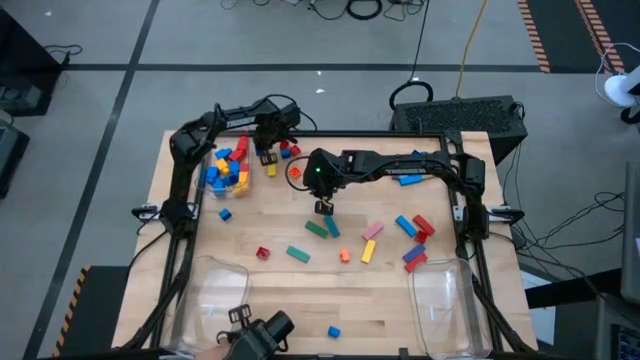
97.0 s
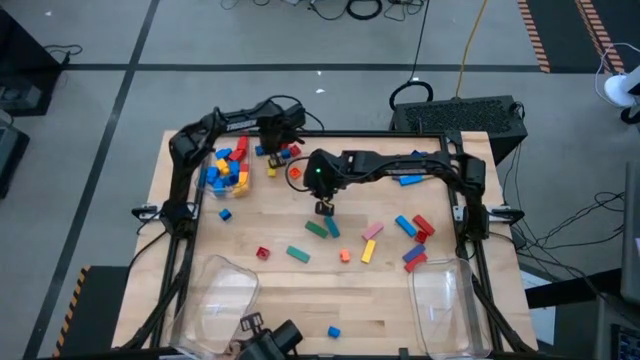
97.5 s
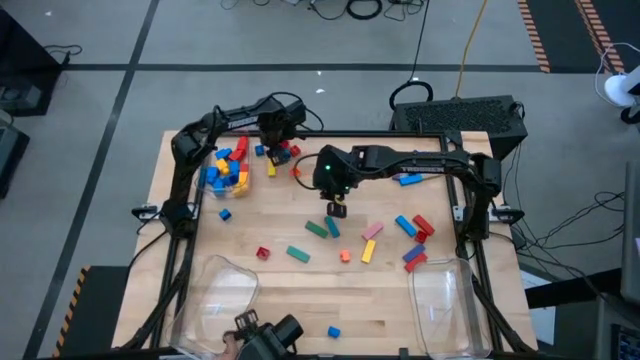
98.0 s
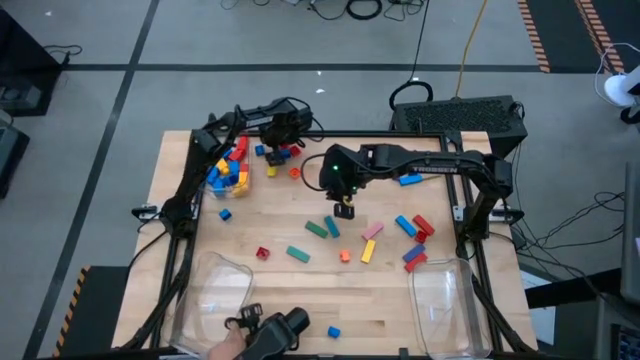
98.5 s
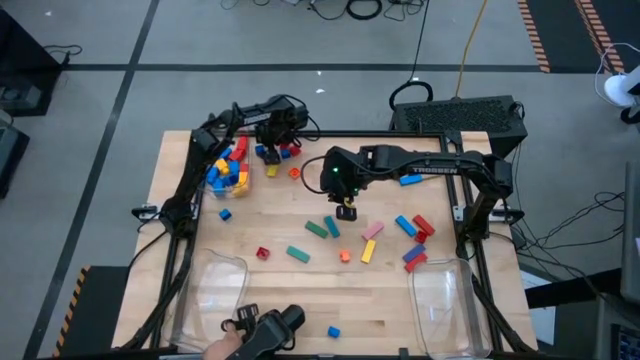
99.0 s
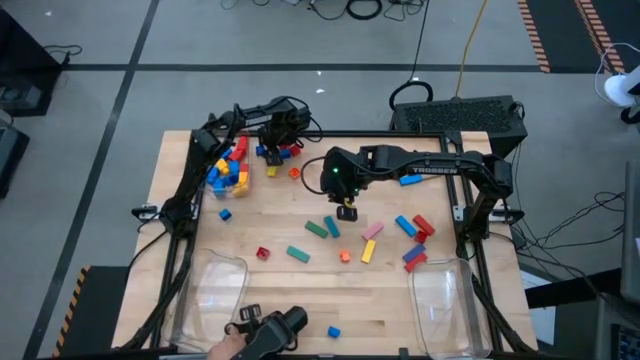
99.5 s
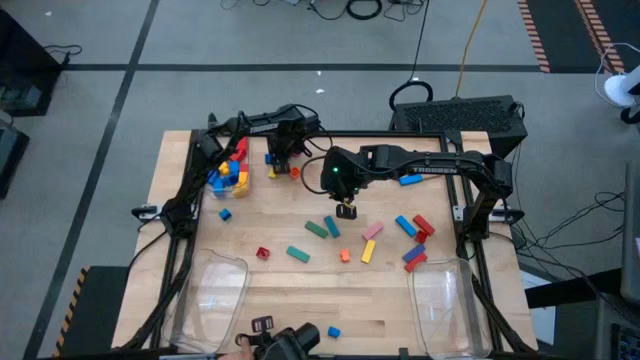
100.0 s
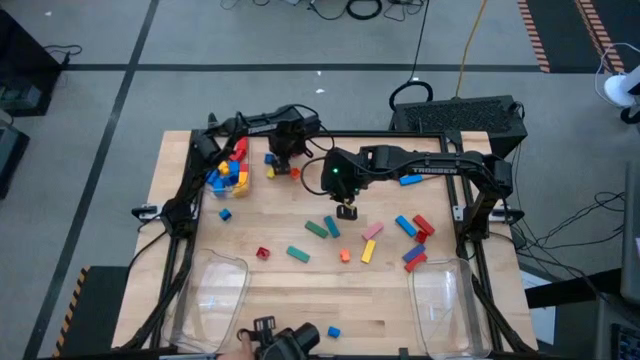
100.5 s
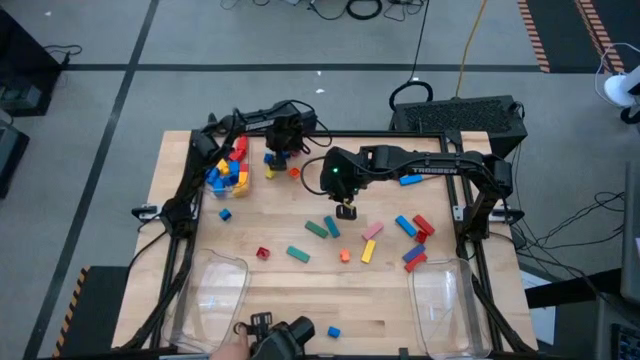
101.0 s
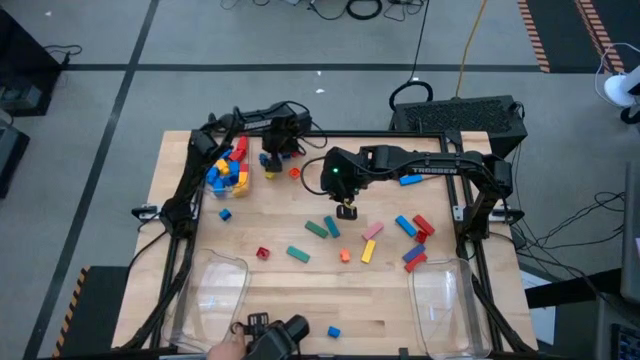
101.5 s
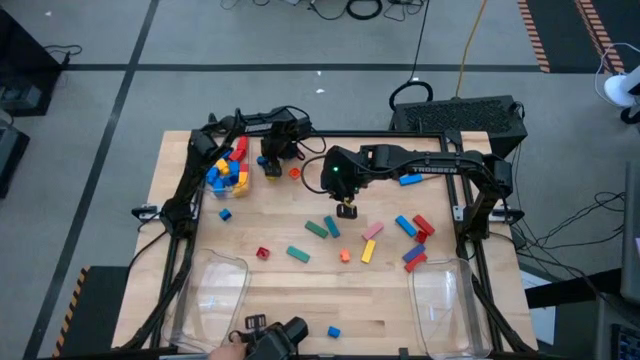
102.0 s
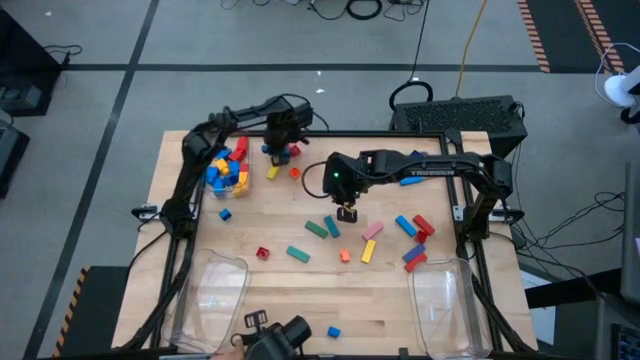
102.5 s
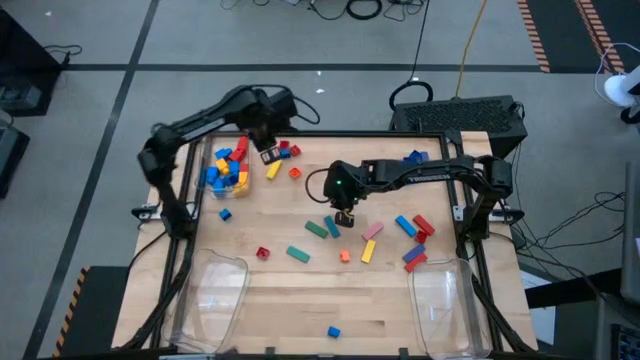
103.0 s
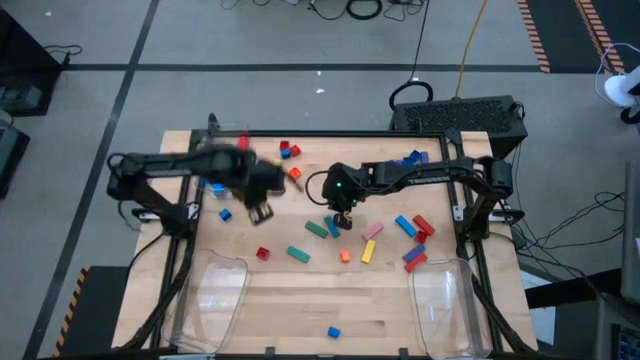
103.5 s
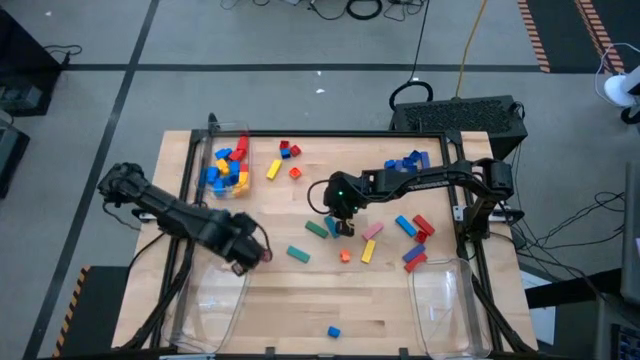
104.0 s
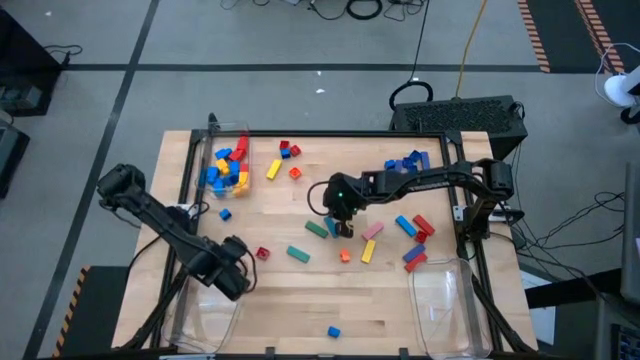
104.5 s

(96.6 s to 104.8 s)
Task: Sort blocks by size
Put the blue four stud game piece into the bottom left transparent bin

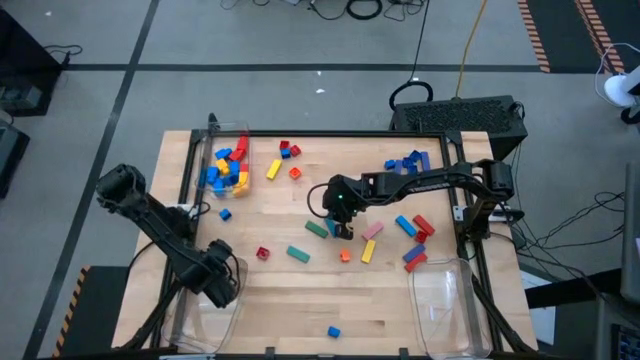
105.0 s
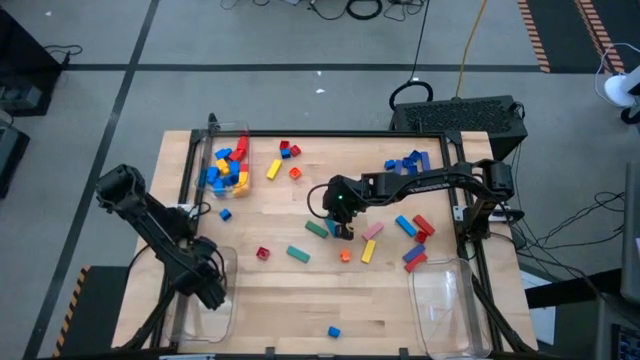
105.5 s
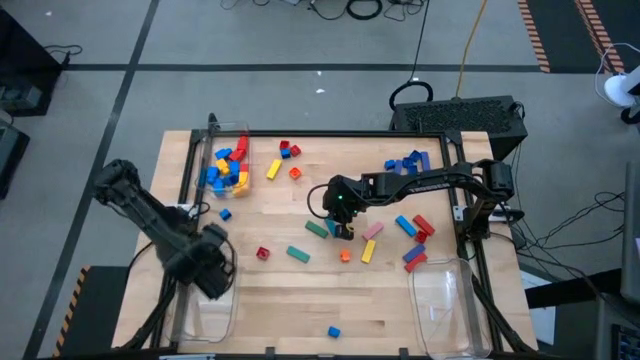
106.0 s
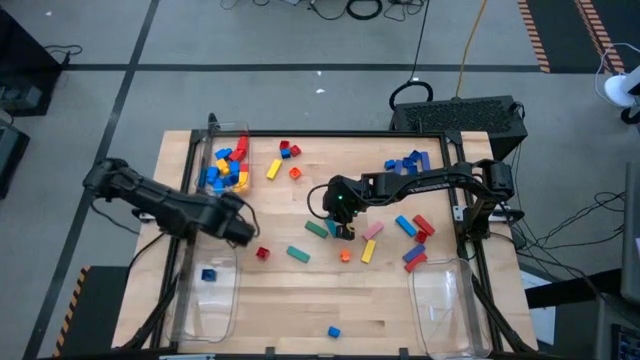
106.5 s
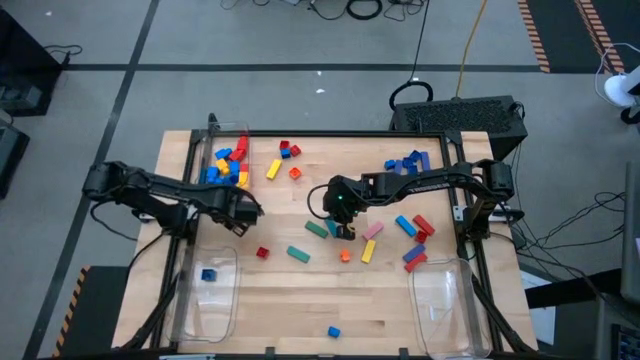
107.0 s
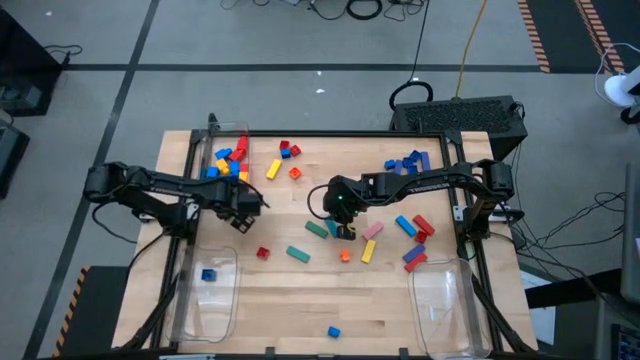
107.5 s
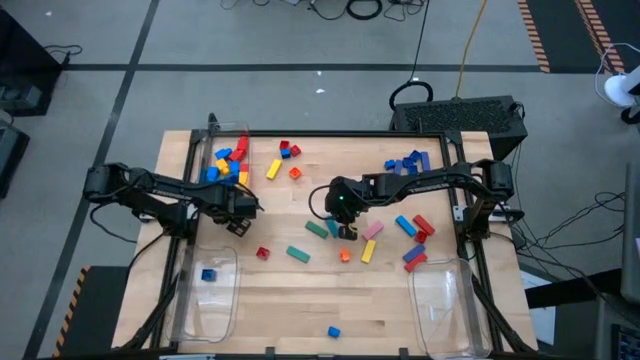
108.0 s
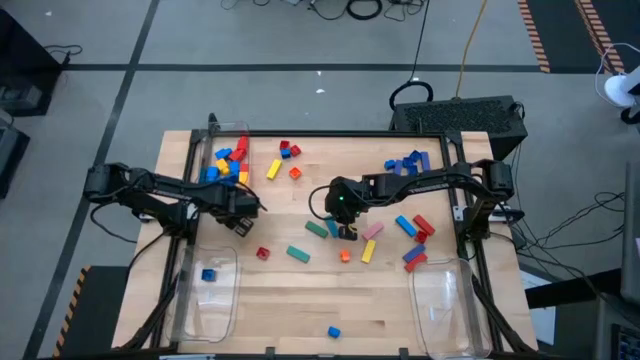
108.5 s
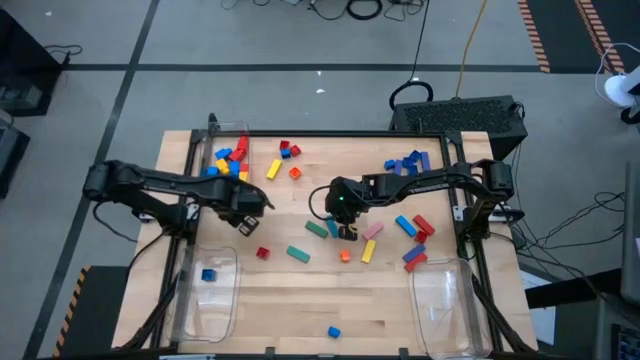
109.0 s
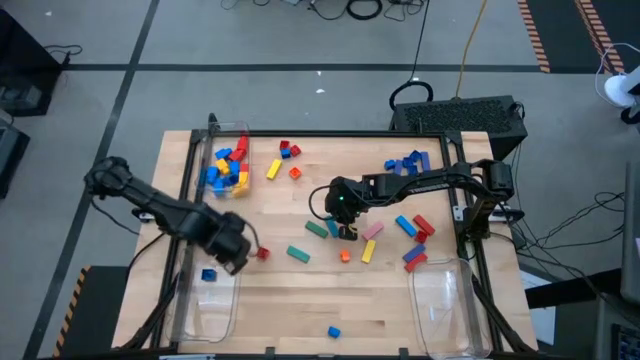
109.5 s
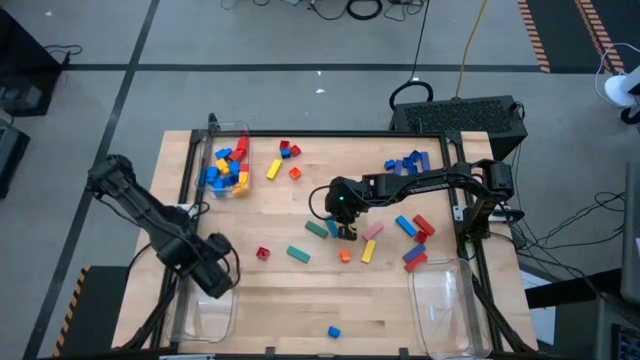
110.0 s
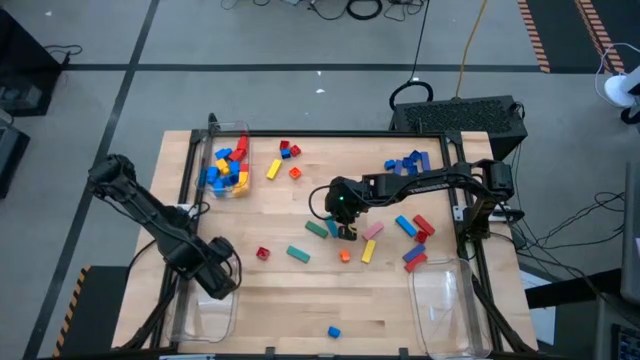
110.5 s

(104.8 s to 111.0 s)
Put the blue four stud game piece into the bottom left transparent bin

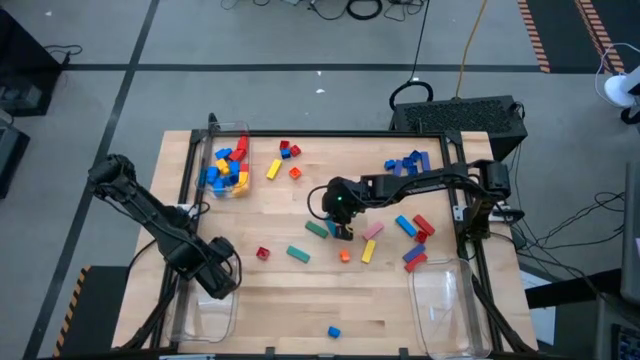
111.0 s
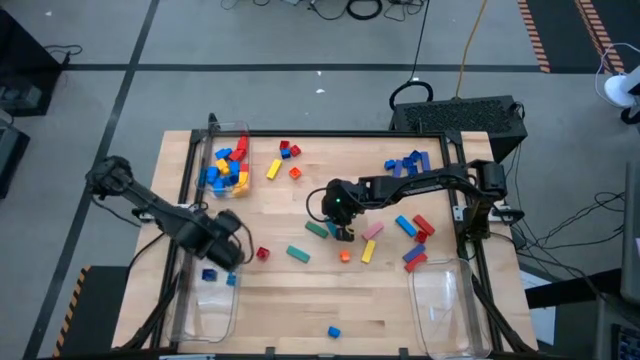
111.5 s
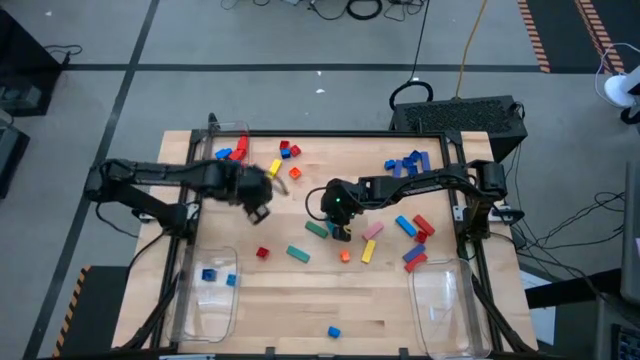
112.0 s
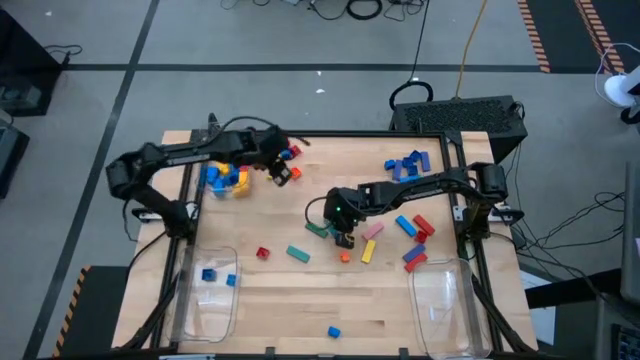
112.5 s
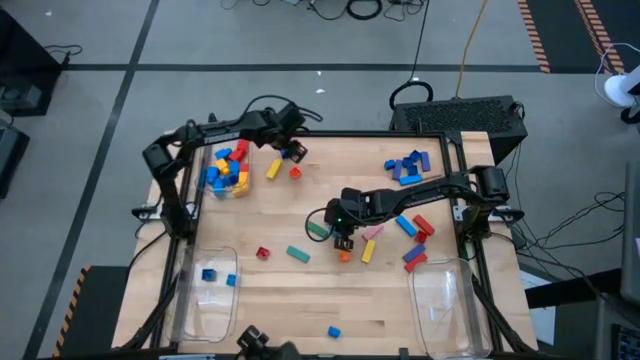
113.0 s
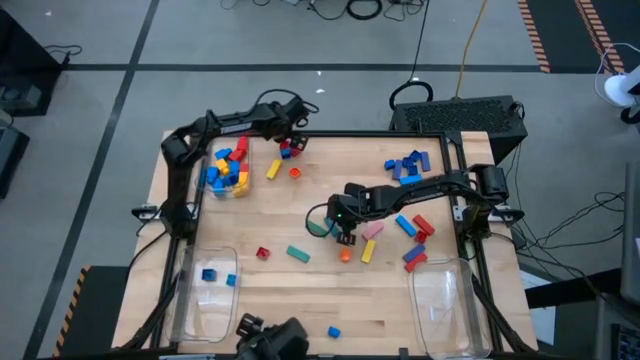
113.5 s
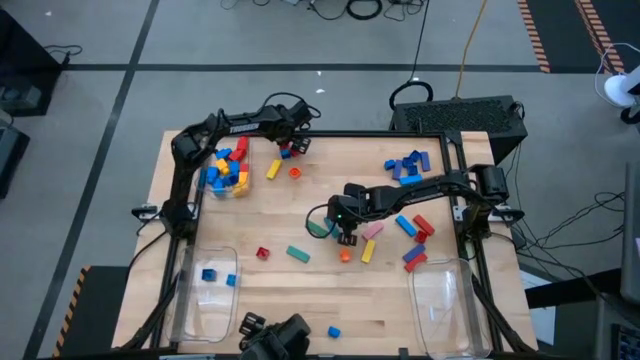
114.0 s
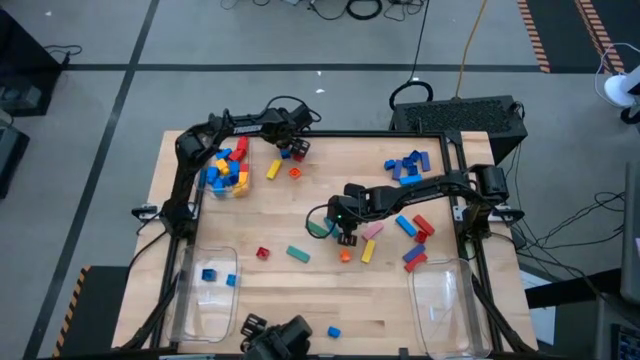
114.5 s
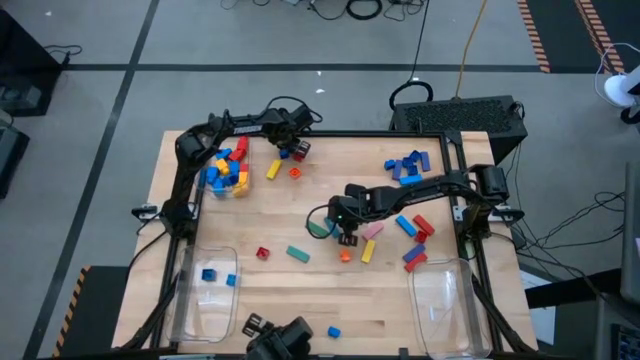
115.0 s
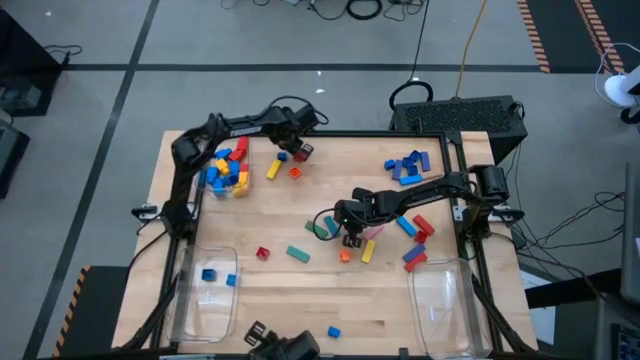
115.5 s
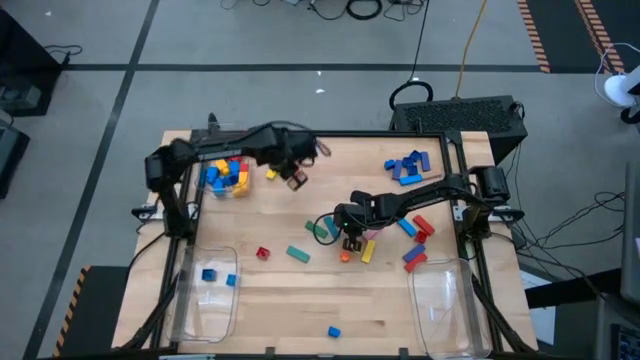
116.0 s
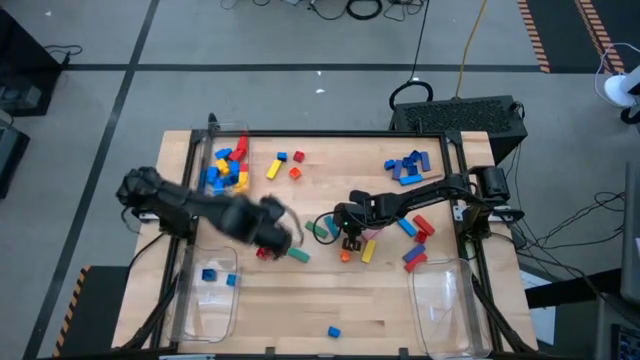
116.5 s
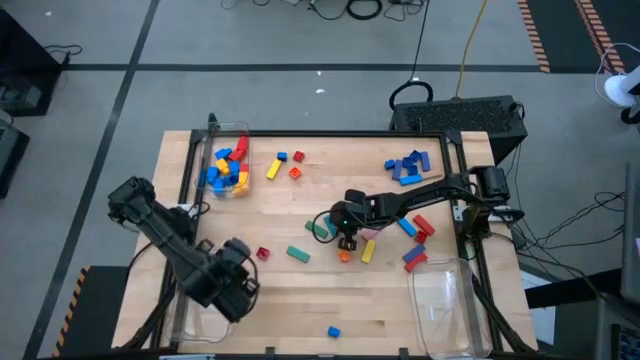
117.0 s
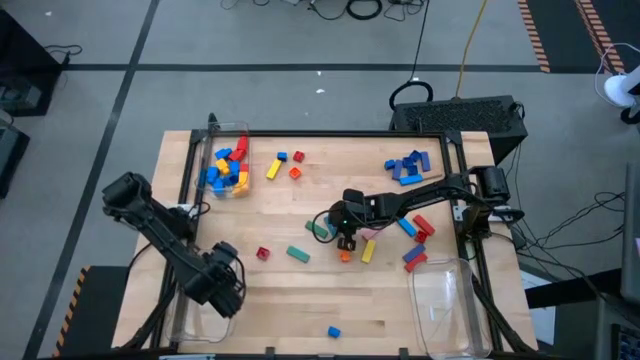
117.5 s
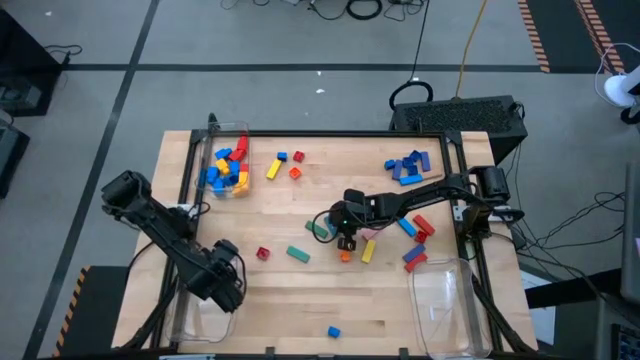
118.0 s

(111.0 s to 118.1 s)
Put the red four stud game piece into the bottom left transparent bin

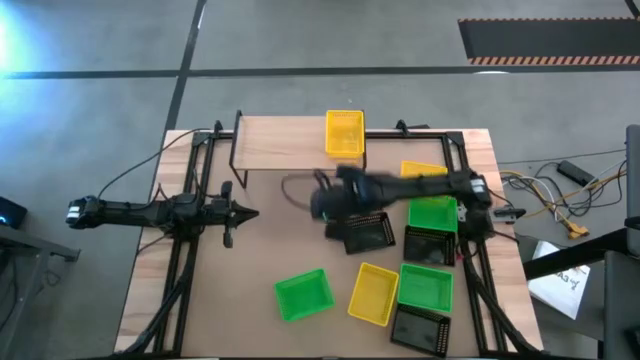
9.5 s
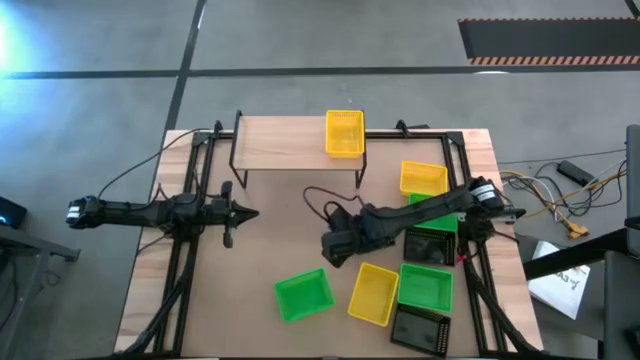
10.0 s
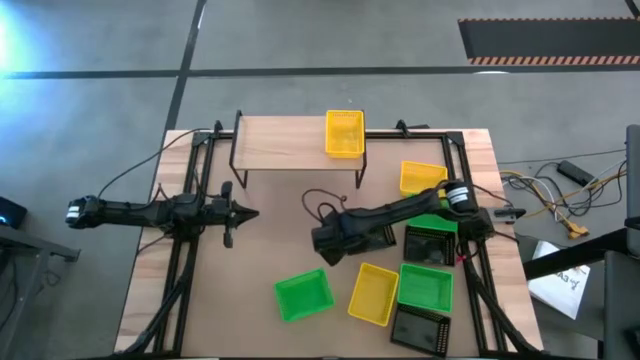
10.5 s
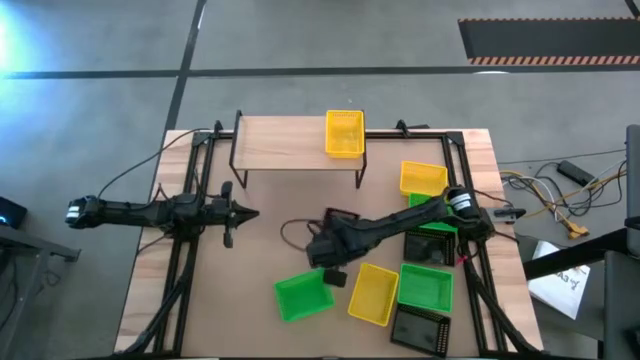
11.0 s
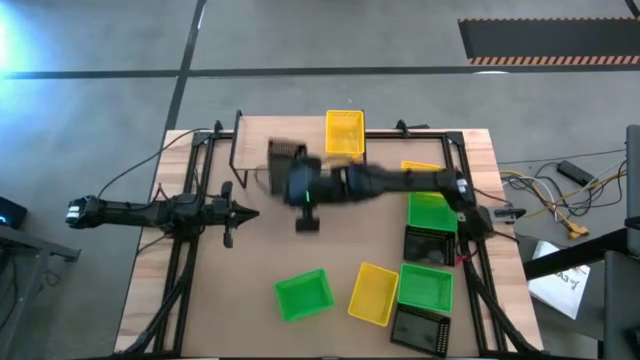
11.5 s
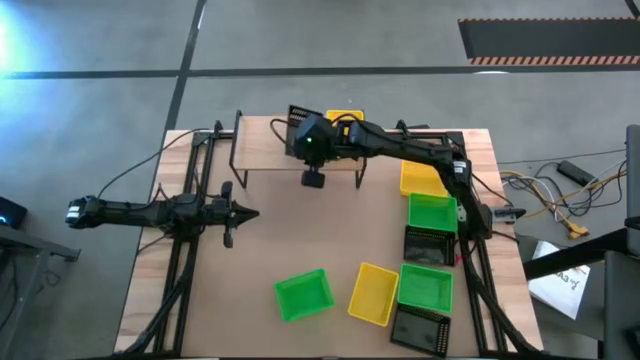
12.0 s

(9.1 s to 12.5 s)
Task: Stack baskets on shelf by color
Put the top left black bin on the shelf
